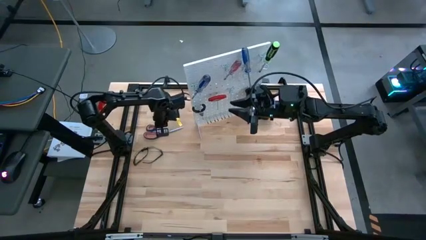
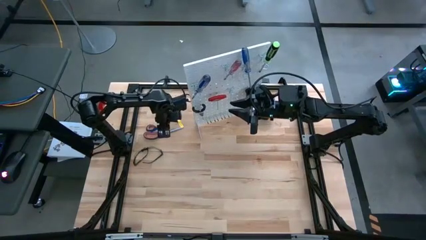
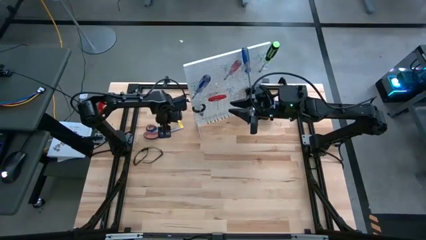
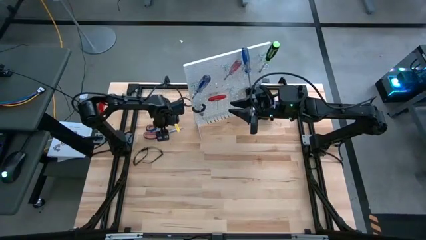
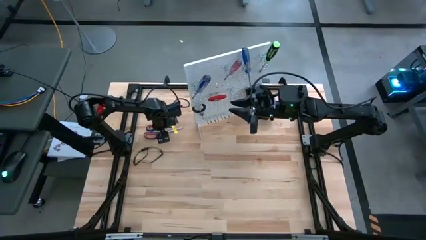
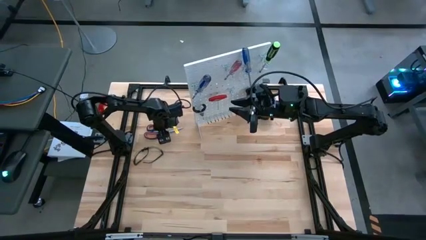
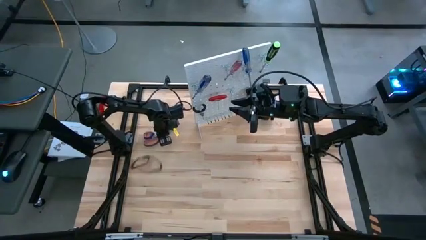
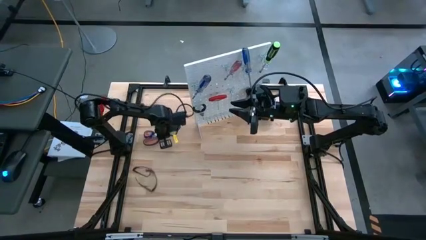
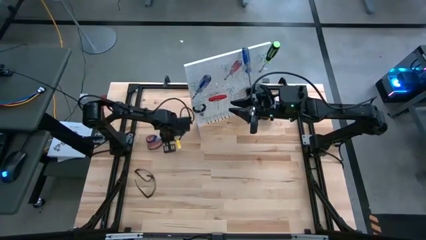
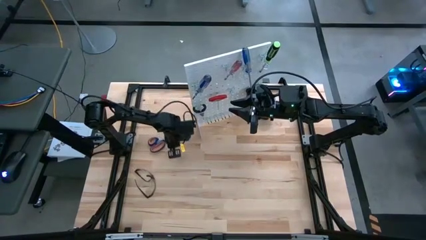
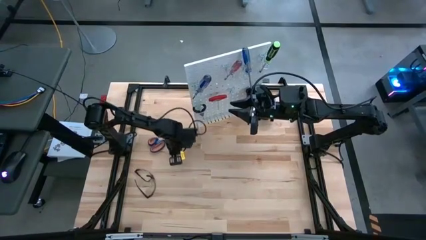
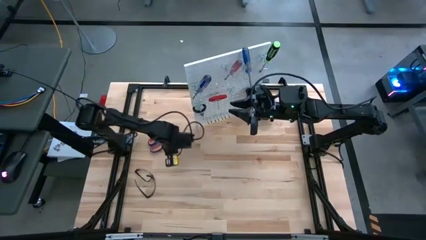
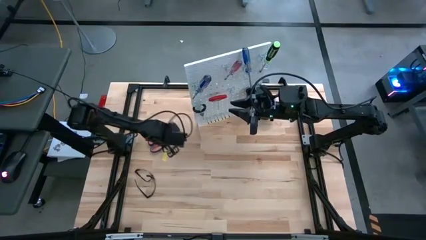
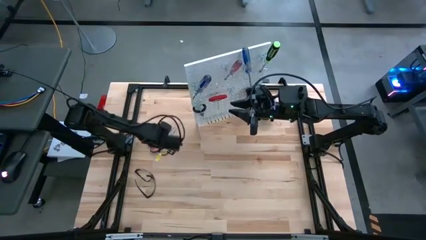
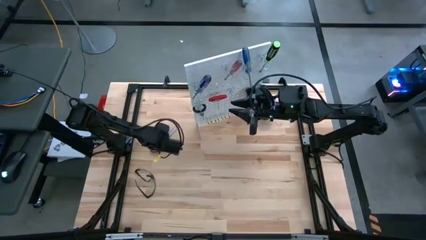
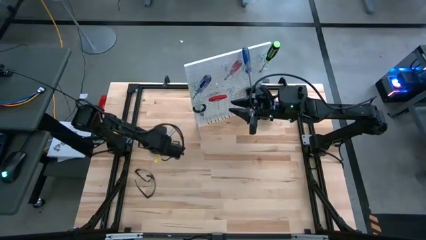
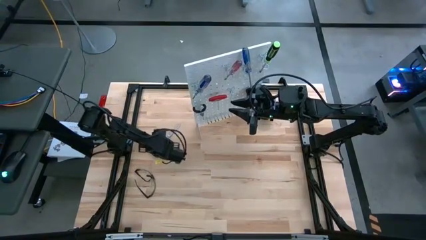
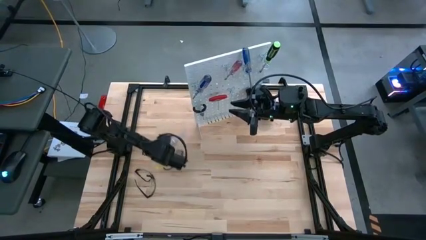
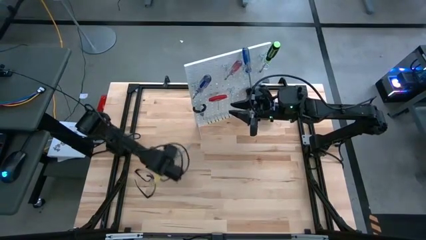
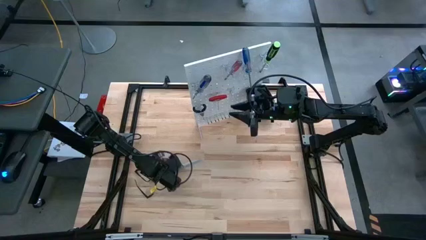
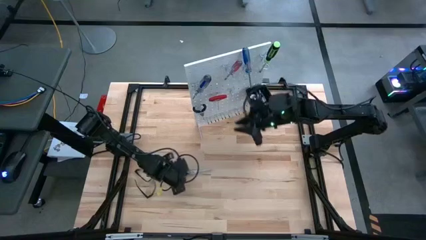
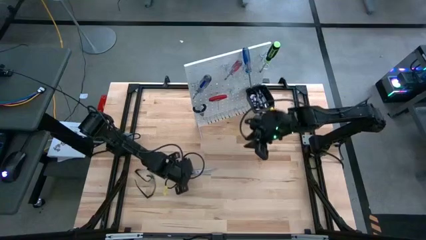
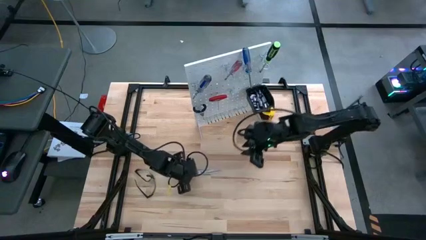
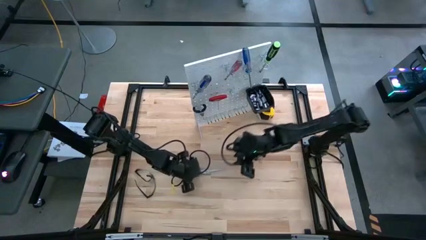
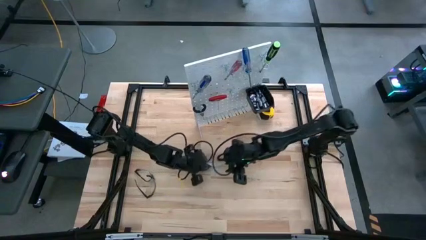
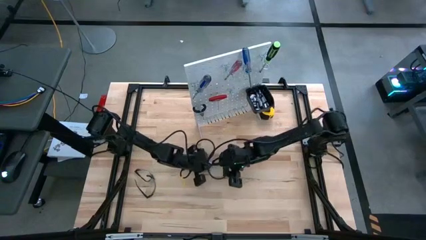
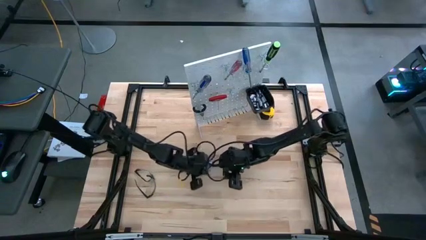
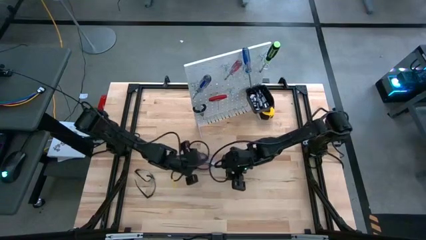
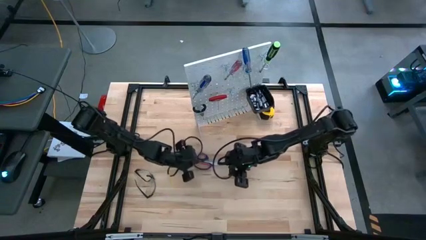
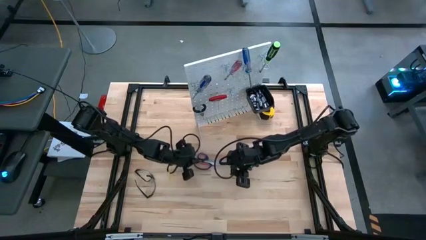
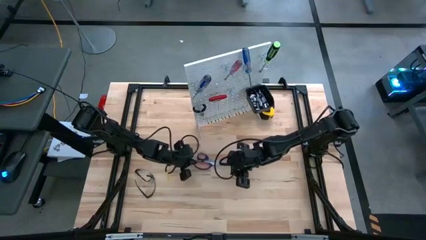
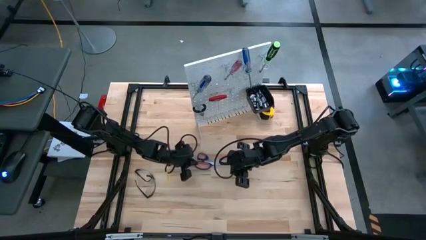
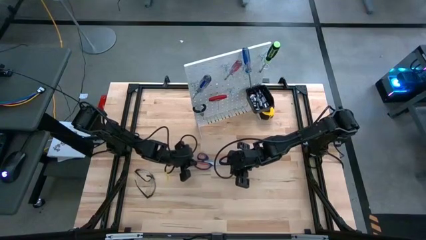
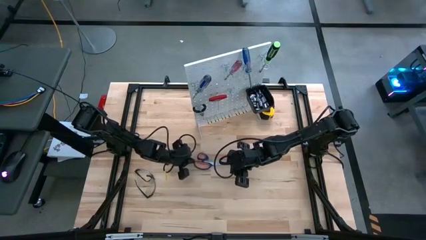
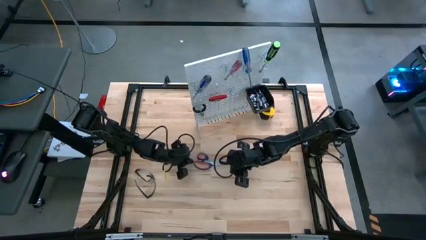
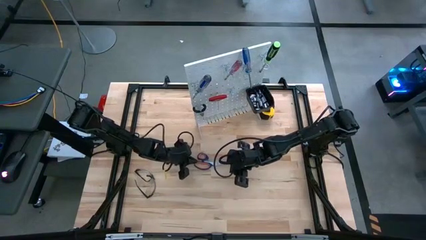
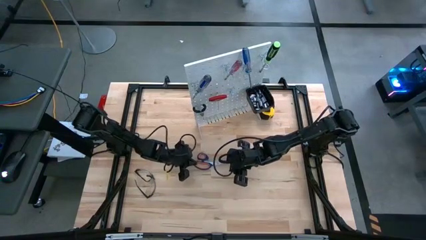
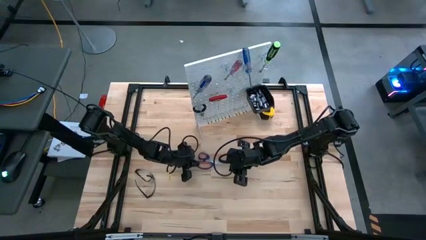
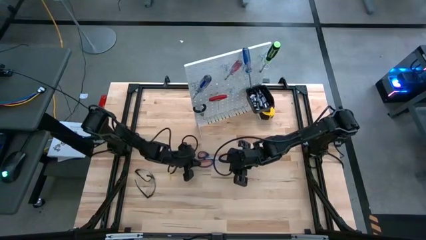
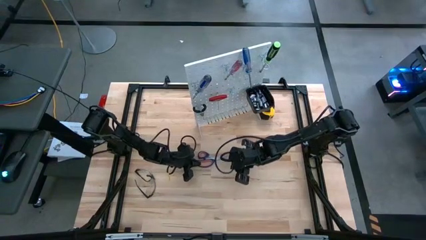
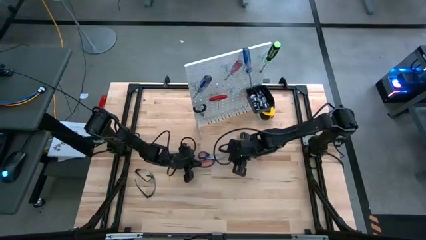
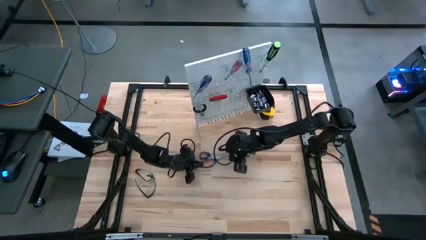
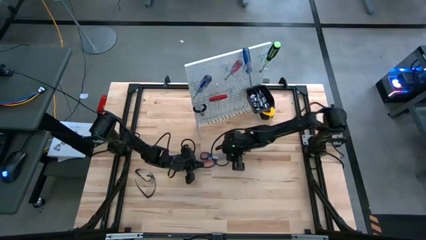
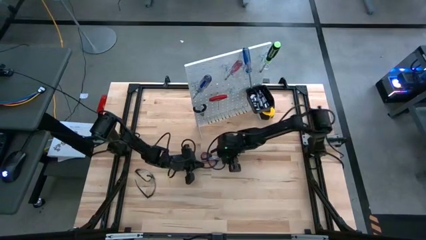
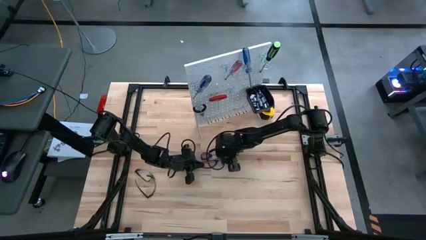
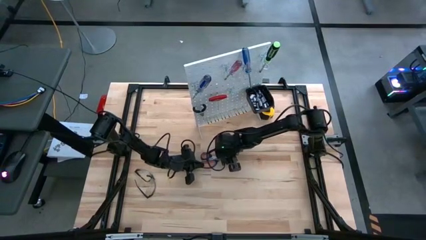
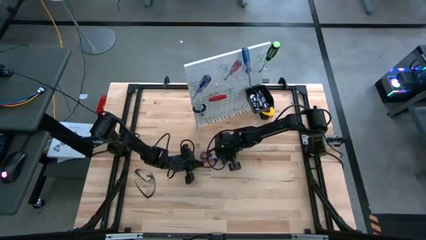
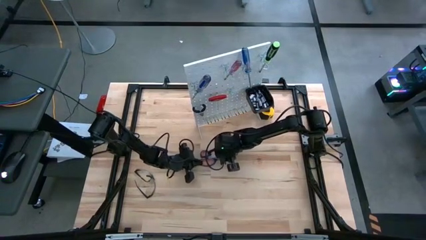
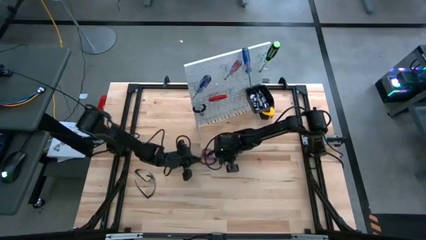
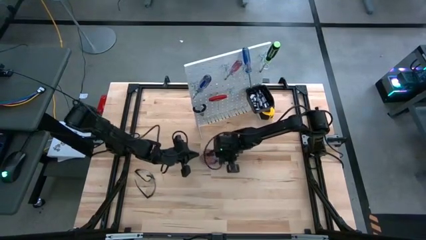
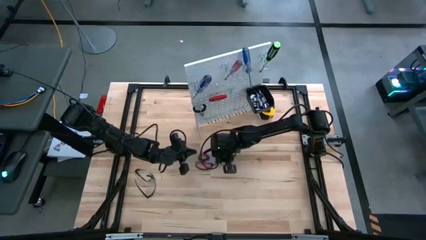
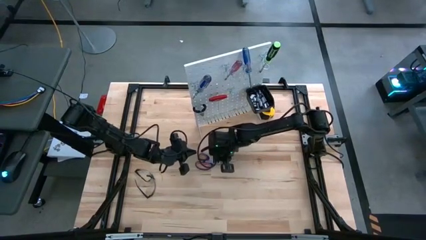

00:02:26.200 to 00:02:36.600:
Task: Hang tools onto peg board
Hang the blue scissors on the peg board

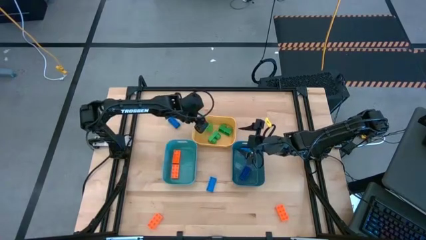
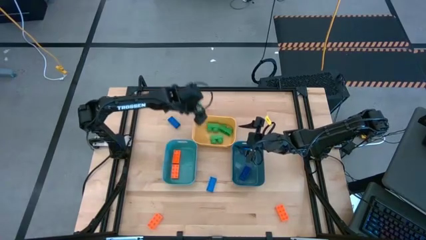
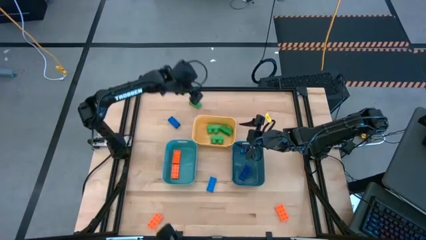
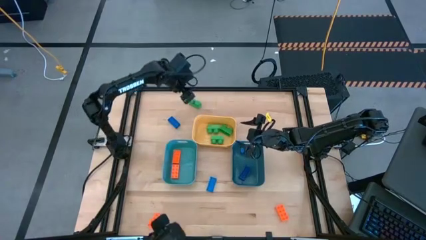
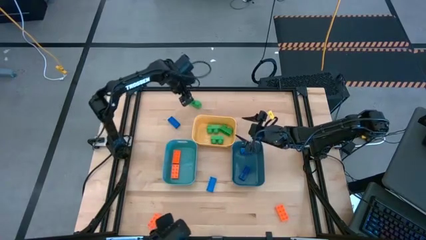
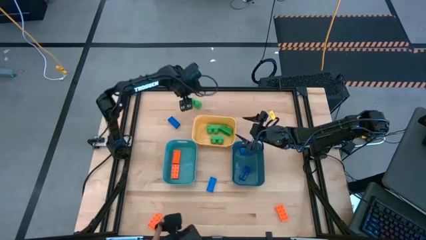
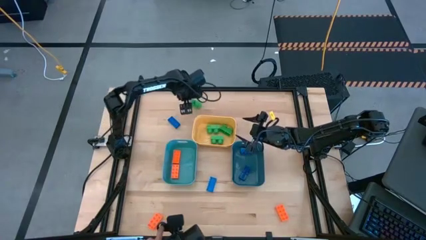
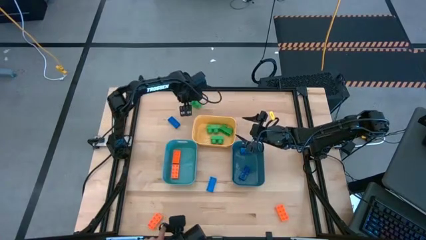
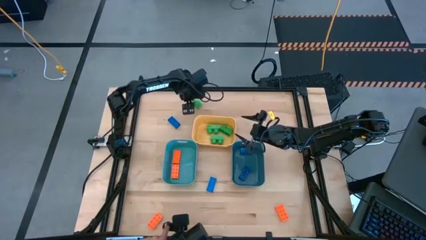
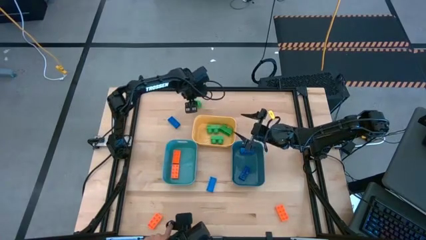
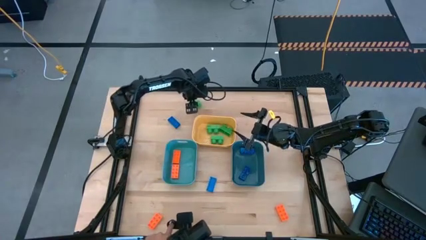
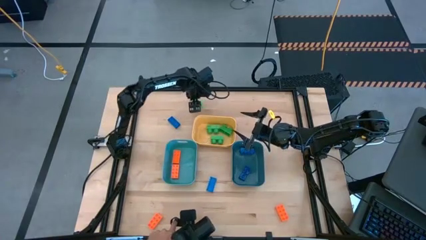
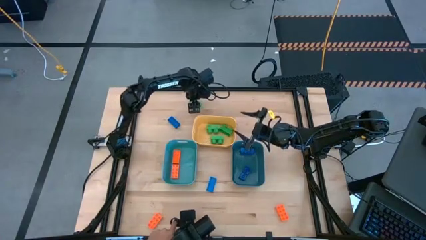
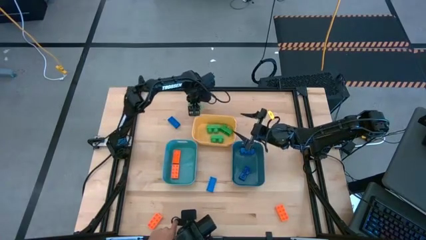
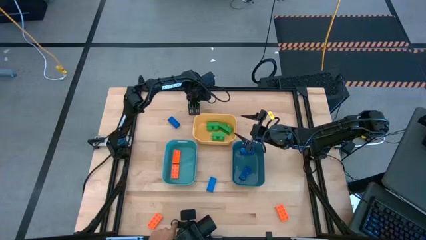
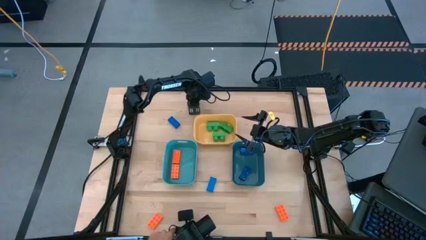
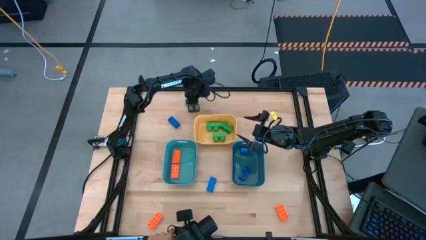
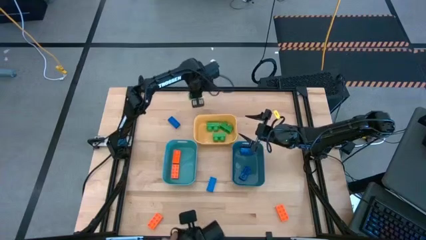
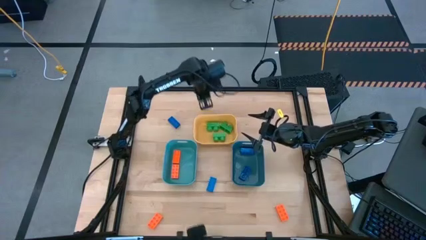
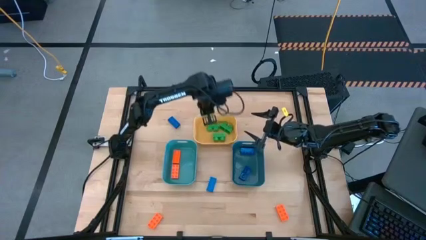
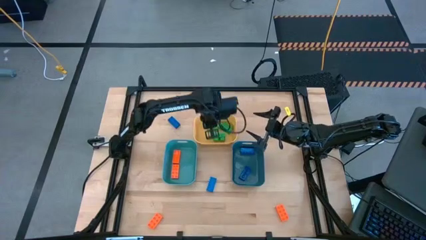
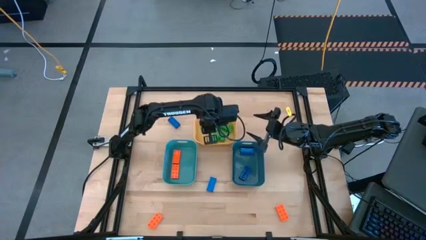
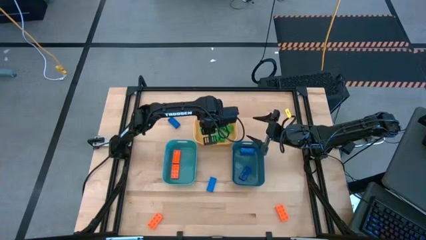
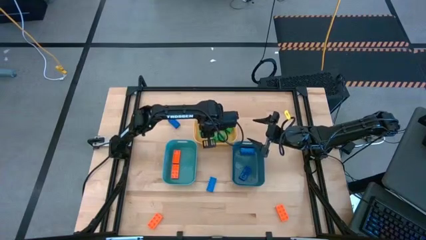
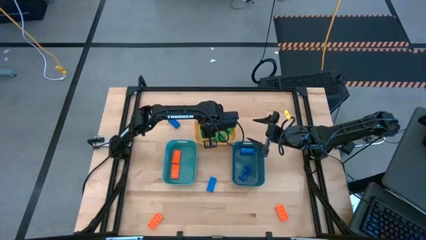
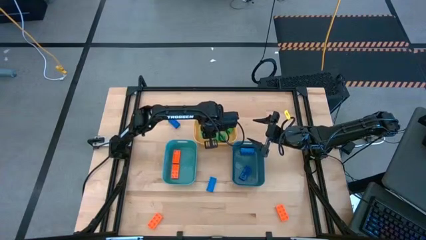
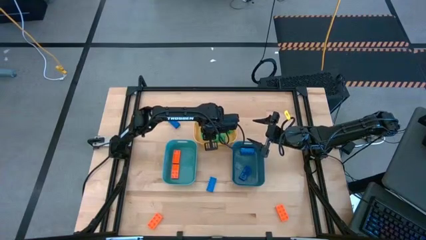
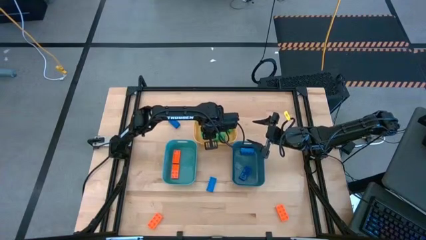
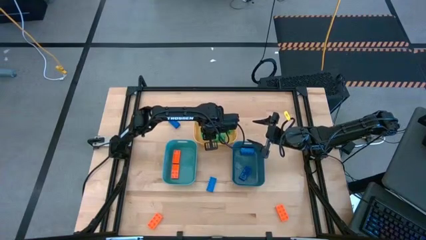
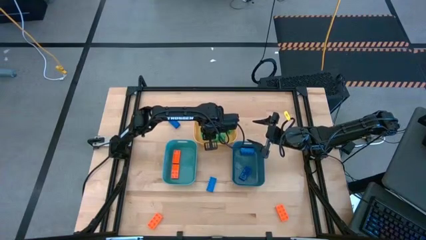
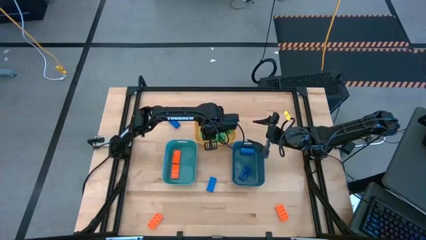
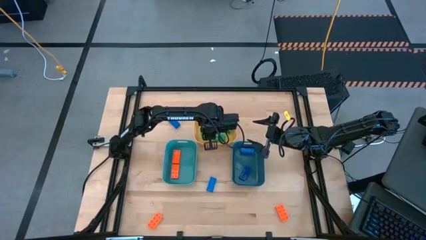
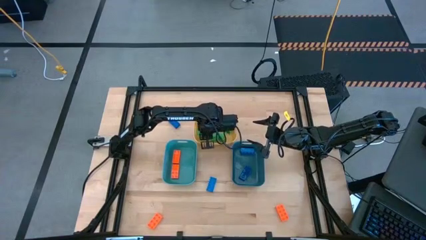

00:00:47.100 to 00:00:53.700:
Task: Sort & place blocks by color
Put the green game piece into the yellow bin
